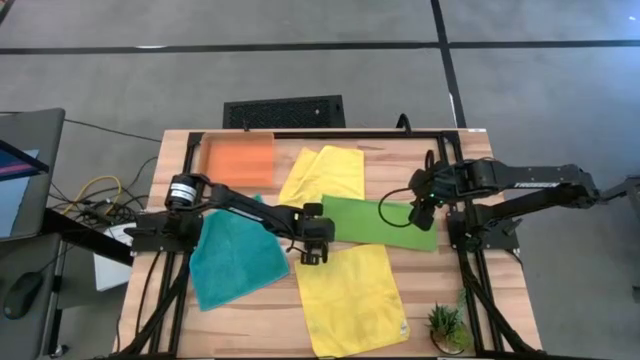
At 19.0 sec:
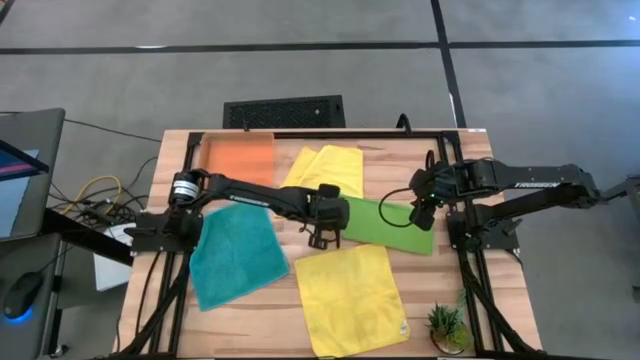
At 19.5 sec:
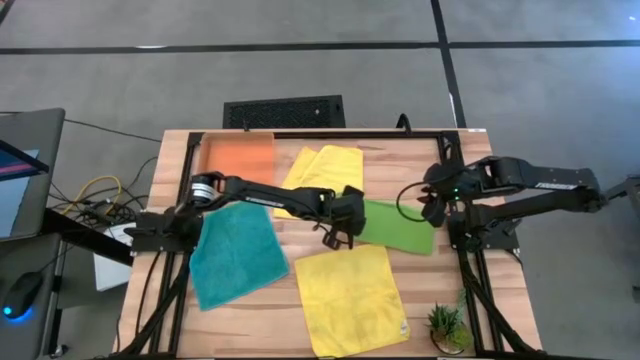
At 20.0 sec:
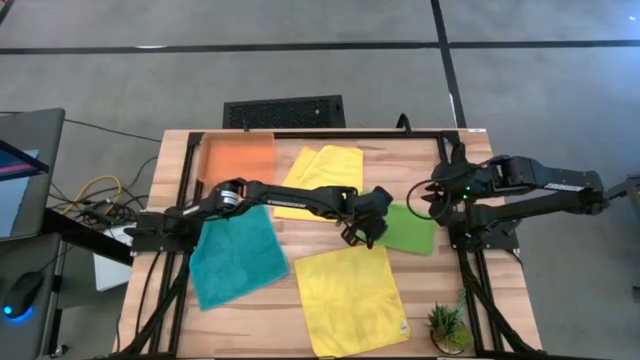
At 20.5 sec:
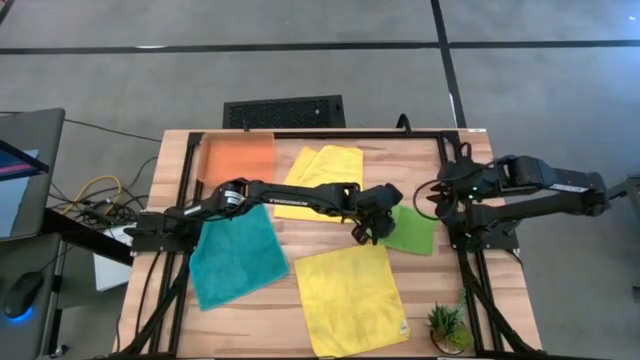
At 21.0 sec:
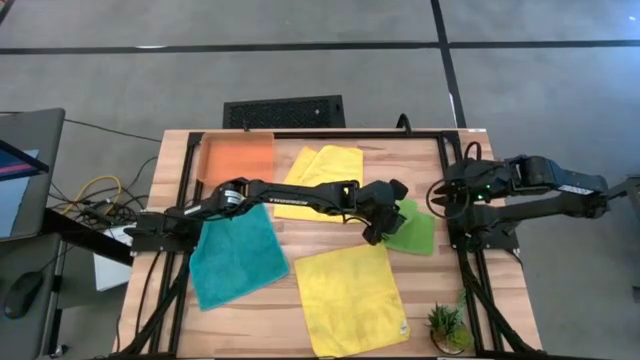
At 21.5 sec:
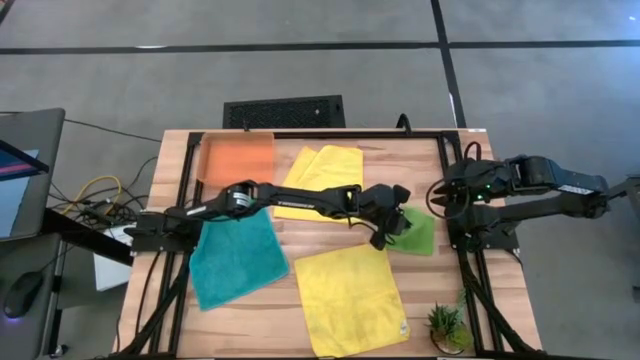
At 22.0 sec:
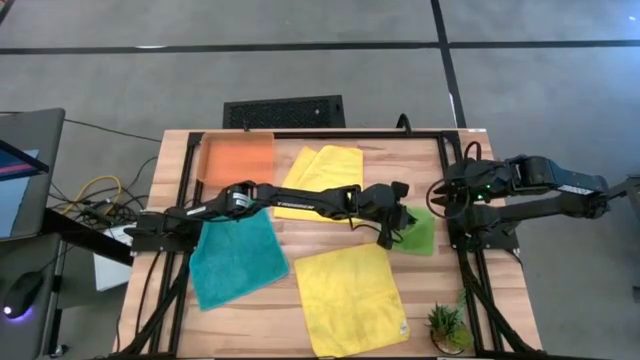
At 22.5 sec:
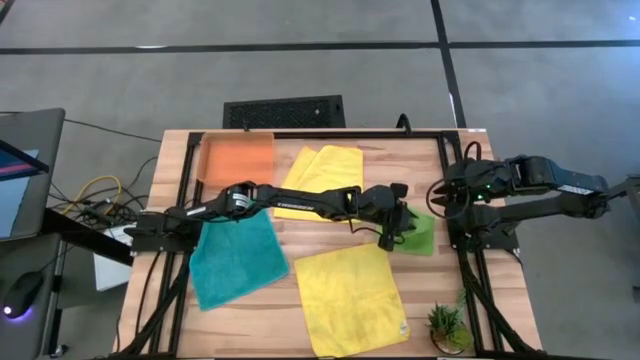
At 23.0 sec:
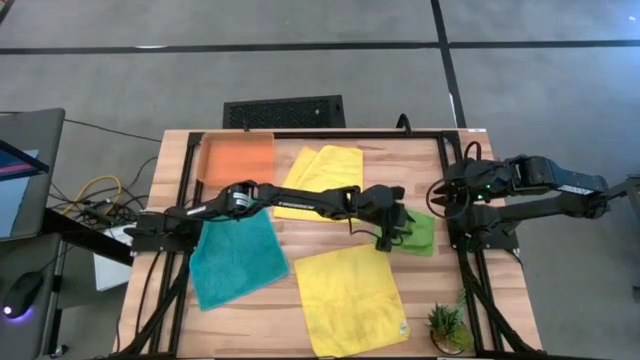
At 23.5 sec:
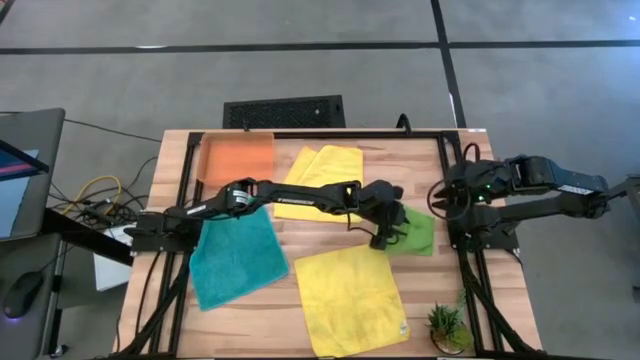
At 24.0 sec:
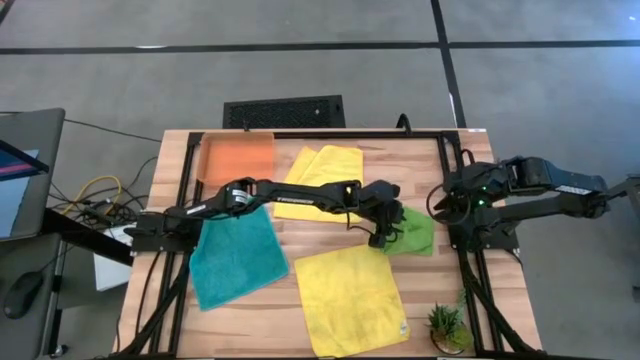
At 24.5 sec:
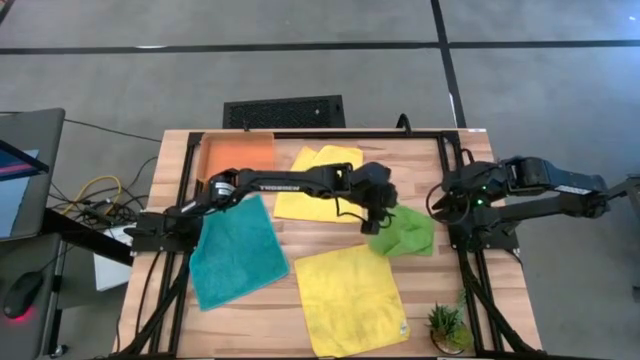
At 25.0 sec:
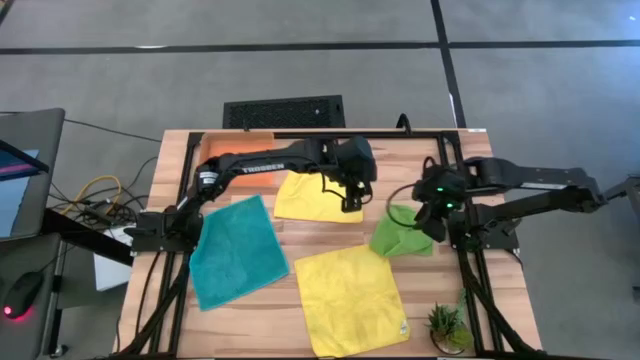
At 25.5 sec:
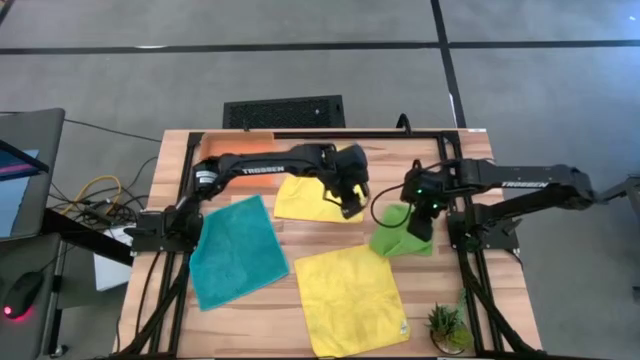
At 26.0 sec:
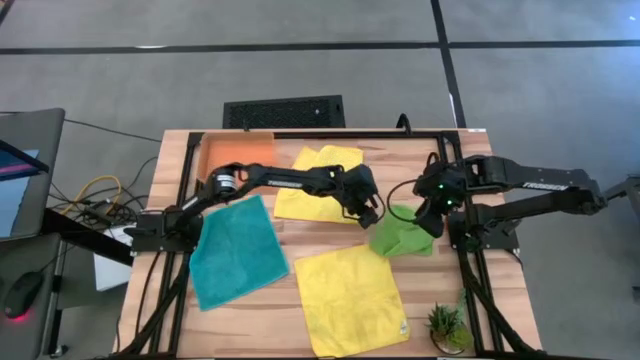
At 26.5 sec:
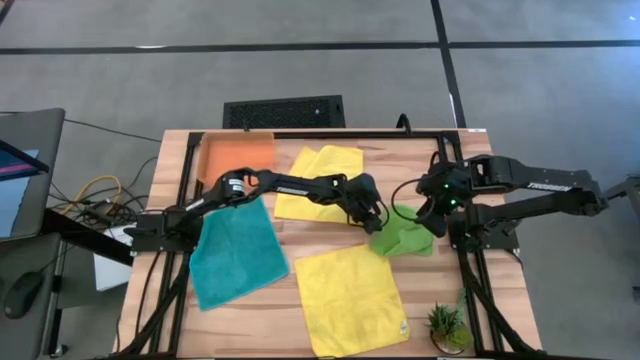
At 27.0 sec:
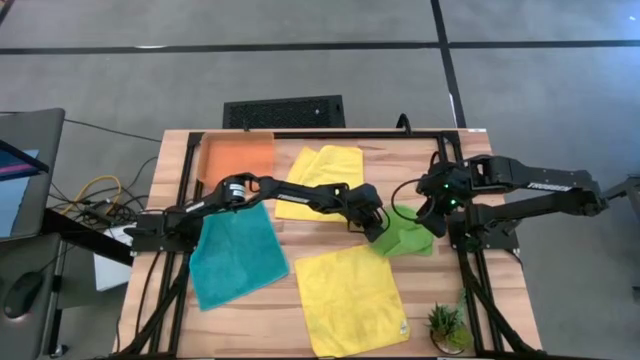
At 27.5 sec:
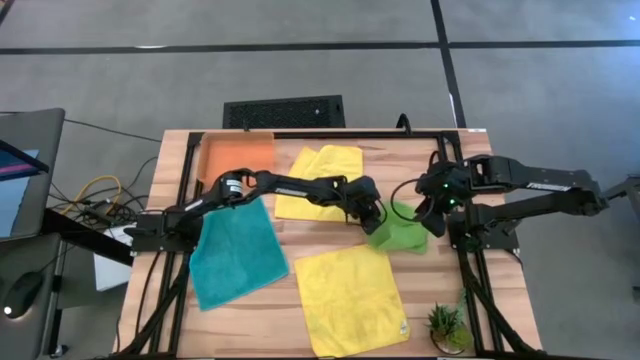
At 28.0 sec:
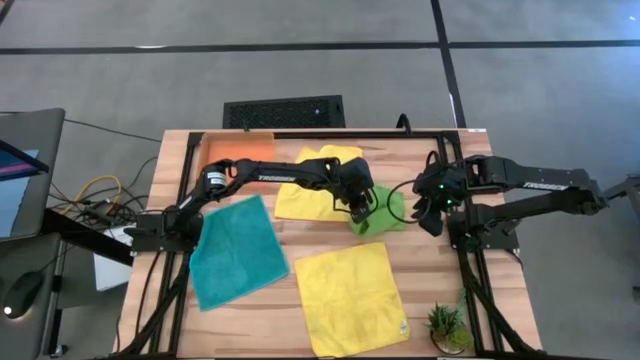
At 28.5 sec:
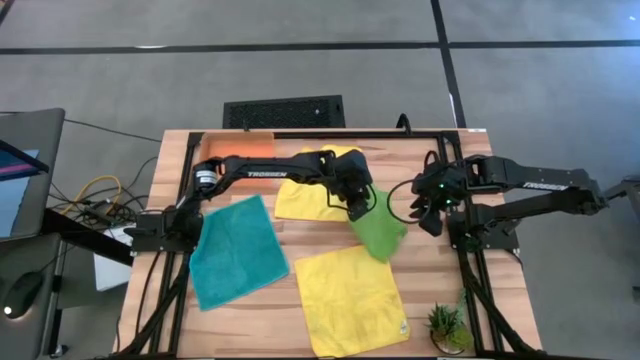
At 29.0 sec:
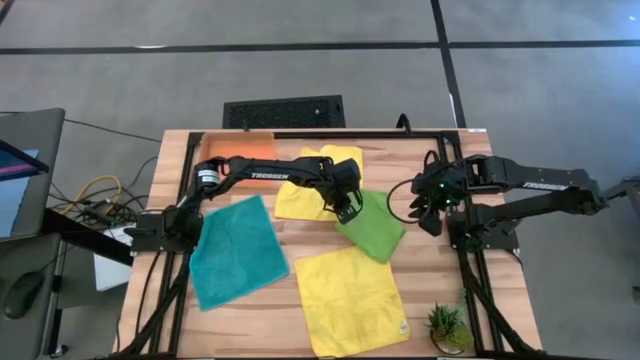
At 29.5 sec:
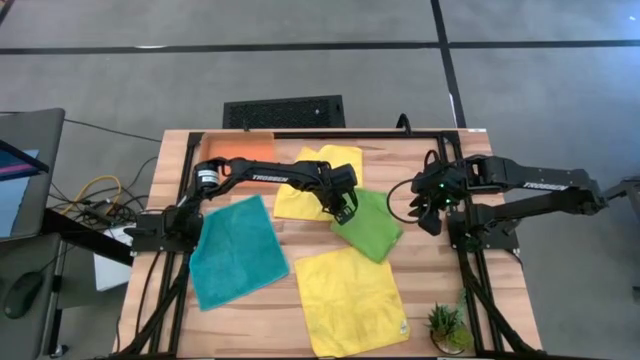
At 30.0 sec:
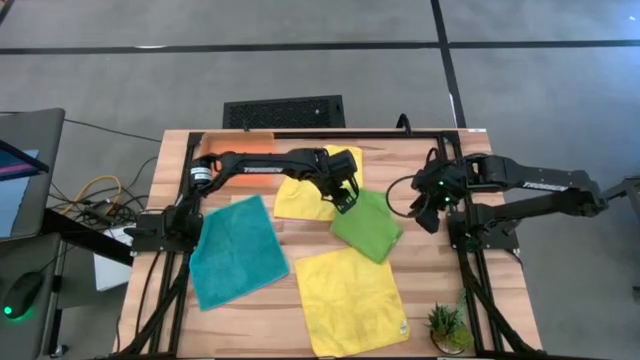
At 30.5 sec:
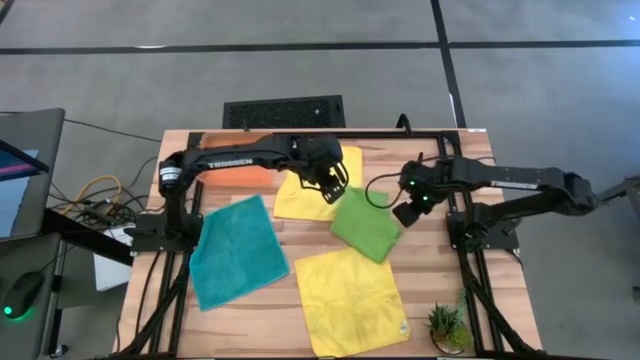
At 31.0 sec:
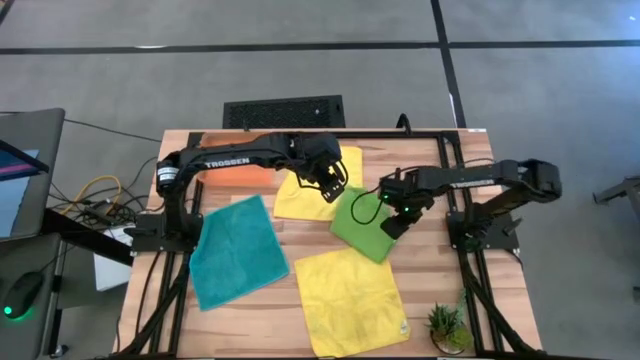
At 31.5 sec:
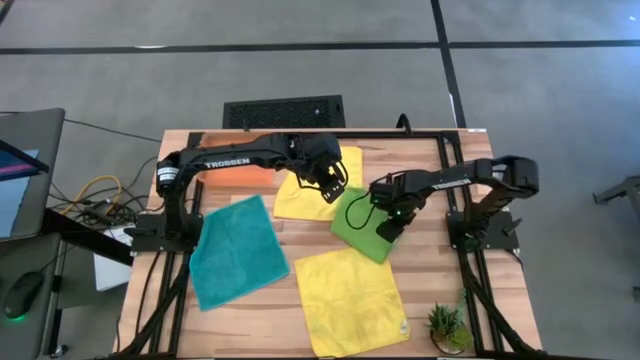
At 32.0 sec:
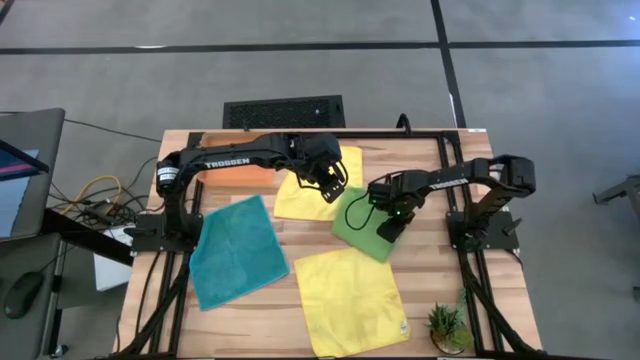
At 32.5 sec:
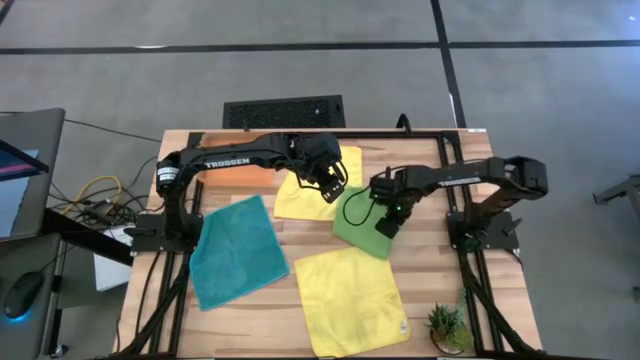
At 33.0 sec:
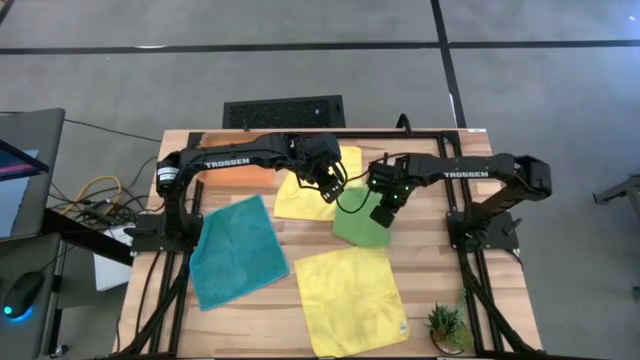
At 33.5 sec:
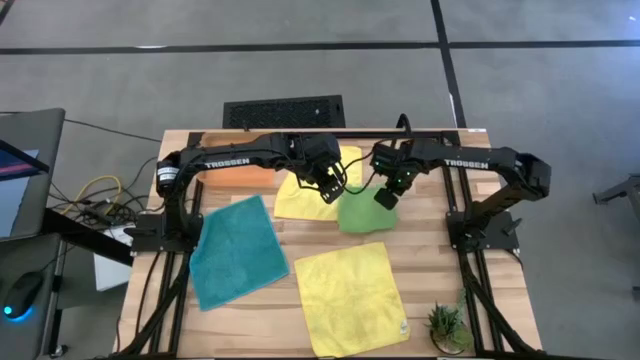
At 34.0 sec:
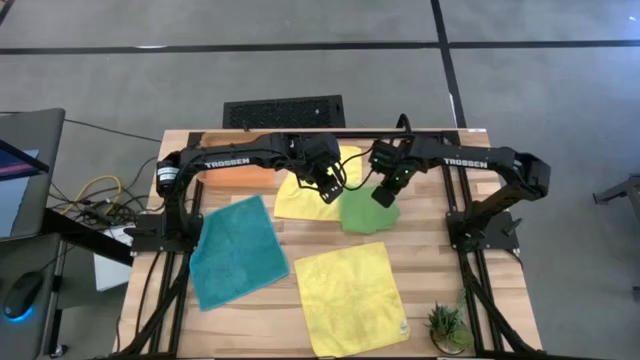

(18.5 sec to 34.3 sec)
Task: Fold microfiber towels
Fold the green microfiber towel

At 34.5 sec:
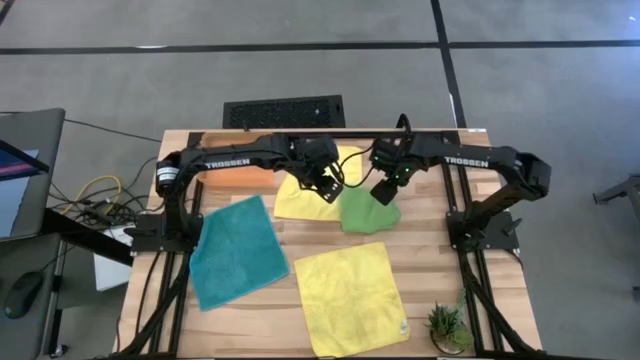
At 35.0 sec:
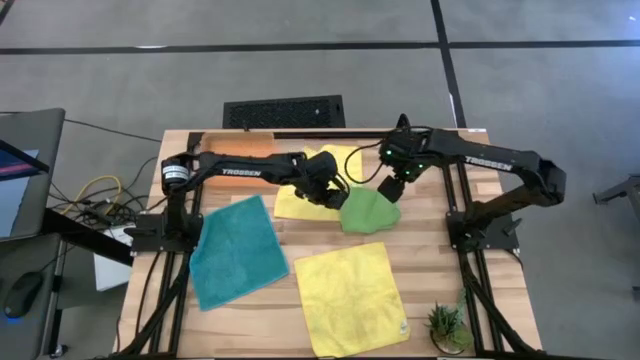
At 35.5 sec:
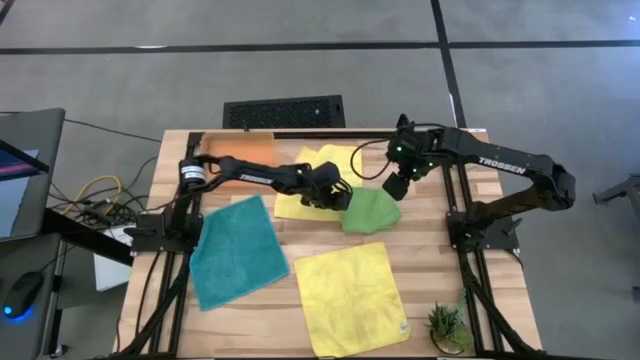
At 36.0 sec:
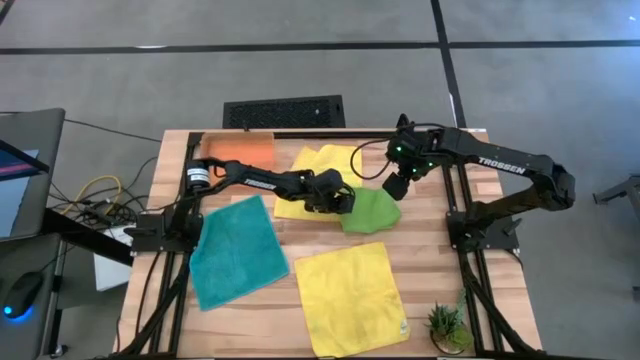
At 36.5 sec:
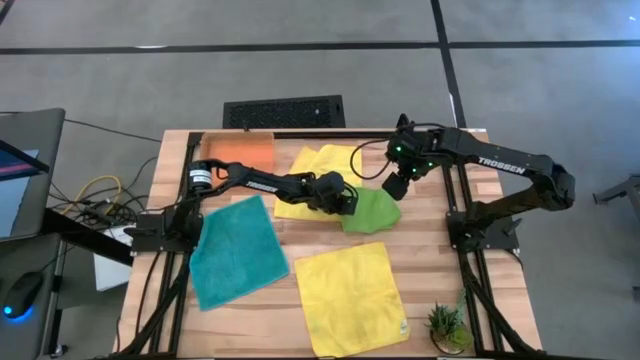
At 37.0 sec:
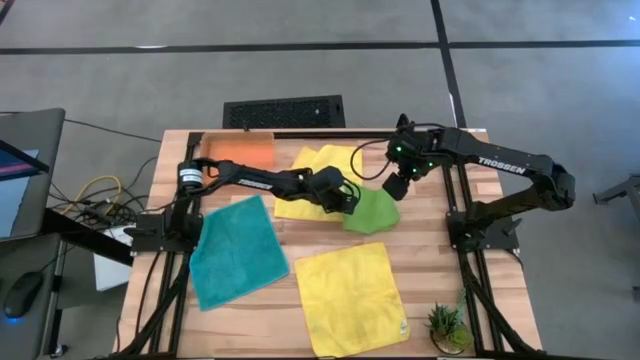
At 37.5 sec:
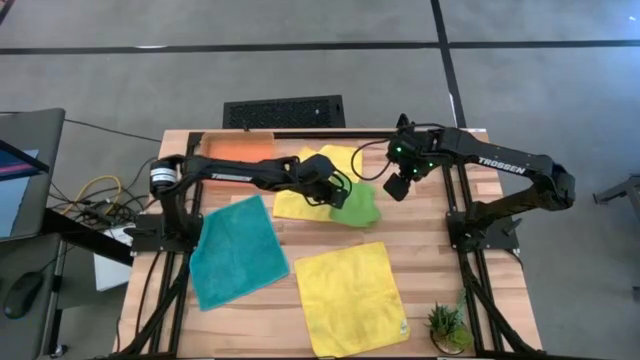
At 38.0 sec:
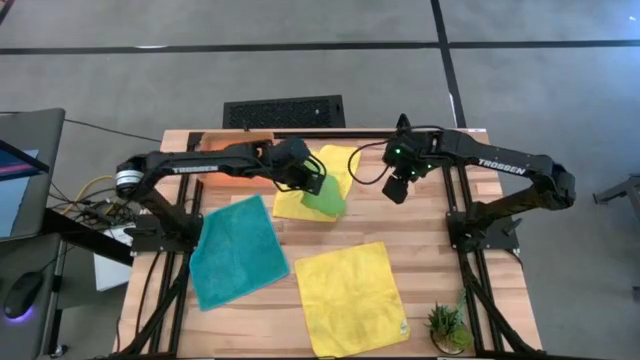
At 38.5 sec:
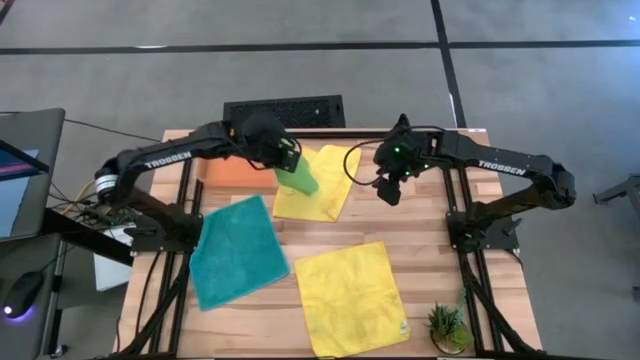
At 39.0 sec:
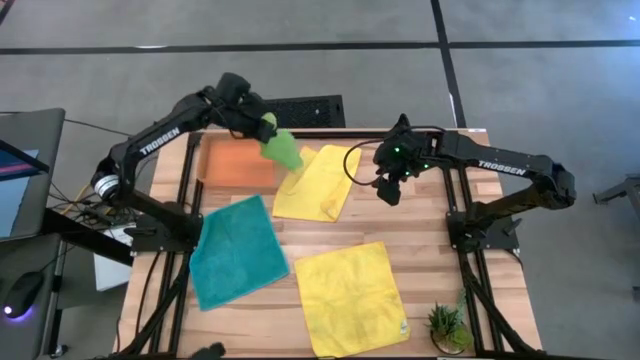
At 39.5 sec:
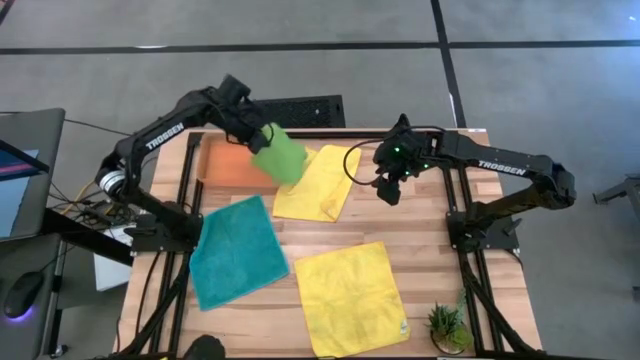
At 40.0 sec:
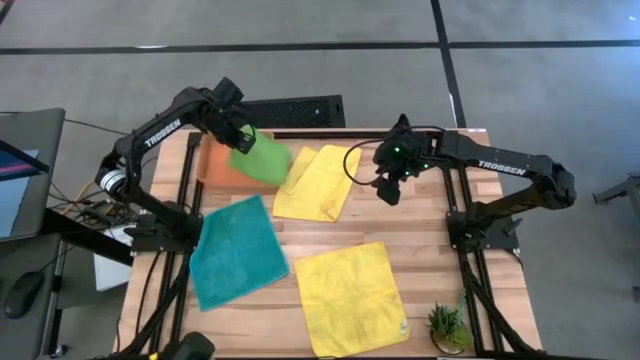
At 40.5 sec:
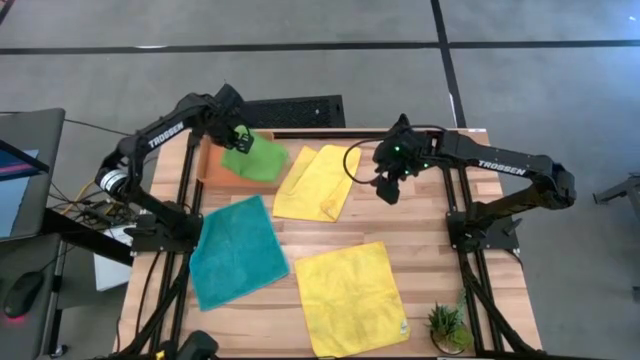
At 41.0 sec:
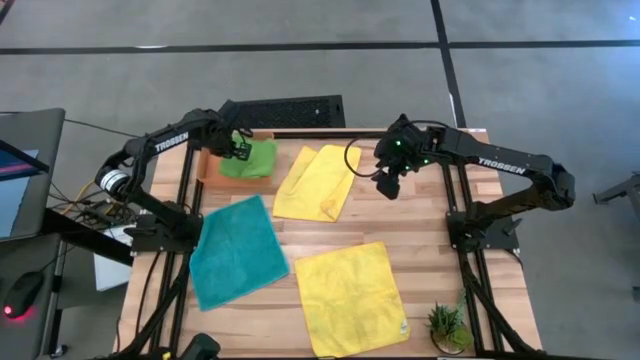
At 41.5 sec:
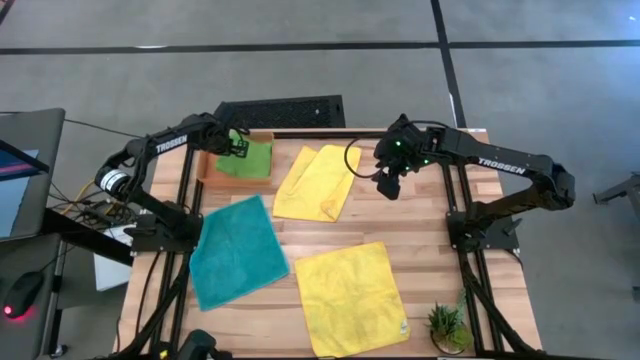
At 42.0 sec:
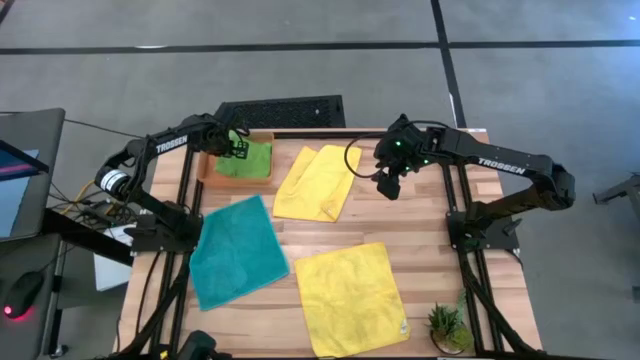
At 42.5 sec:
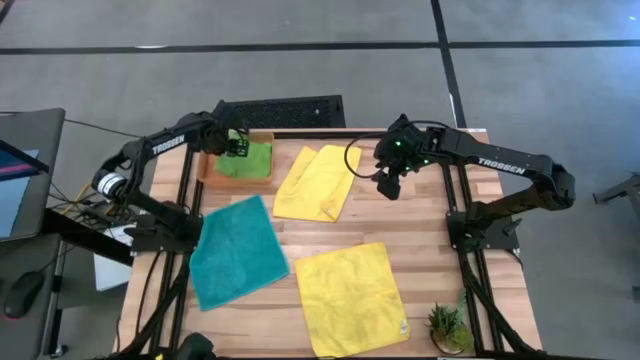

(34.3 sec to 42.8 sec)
Put the green microfiber towel into the orange bin
